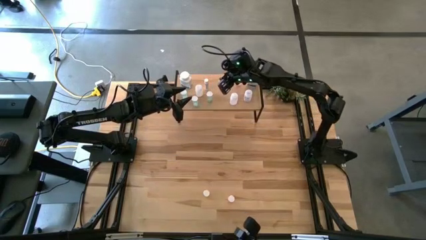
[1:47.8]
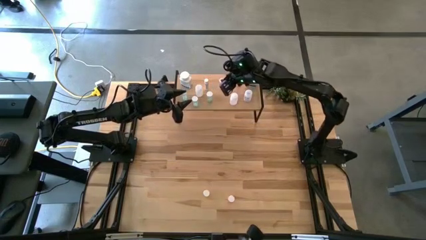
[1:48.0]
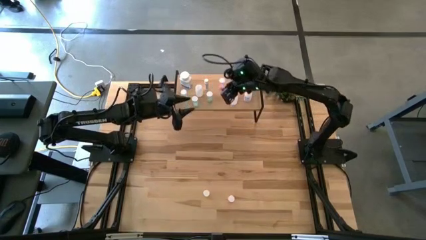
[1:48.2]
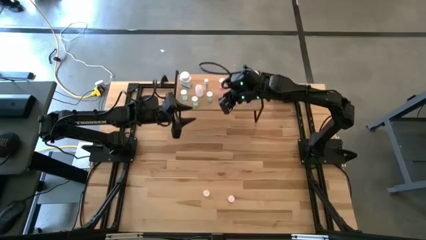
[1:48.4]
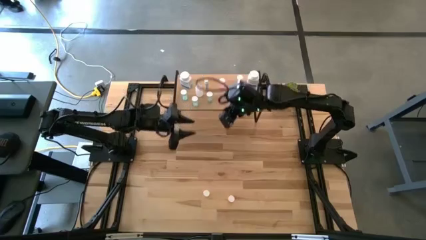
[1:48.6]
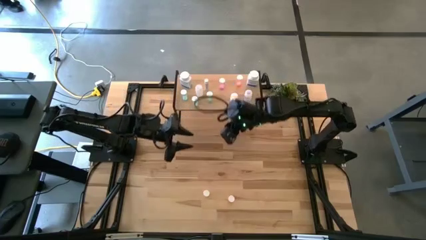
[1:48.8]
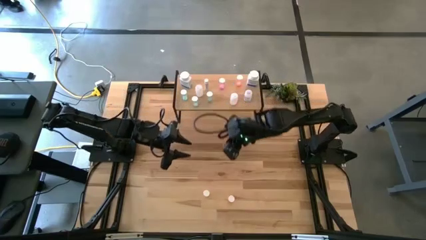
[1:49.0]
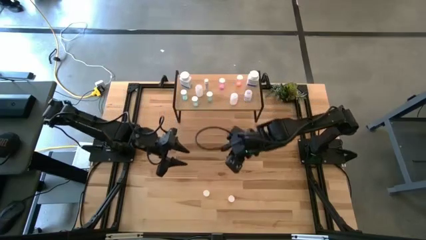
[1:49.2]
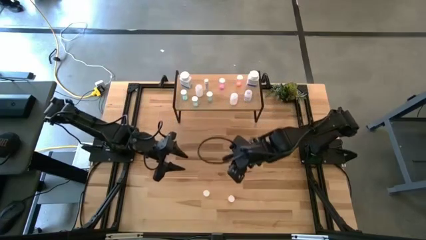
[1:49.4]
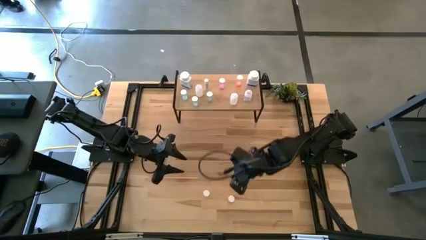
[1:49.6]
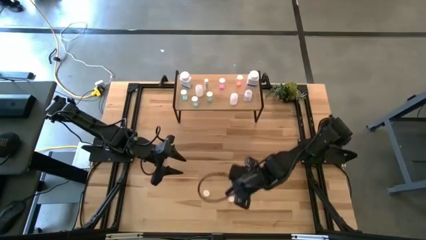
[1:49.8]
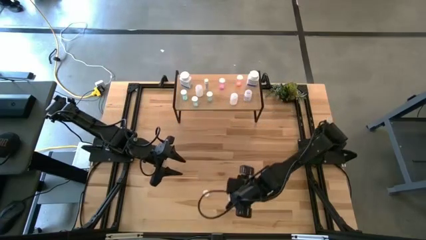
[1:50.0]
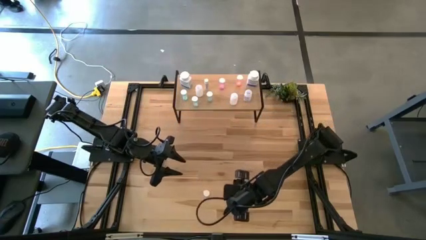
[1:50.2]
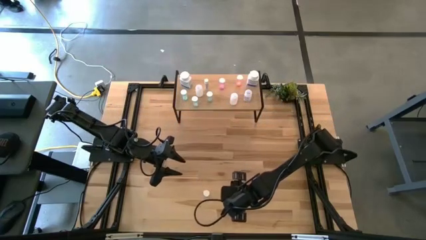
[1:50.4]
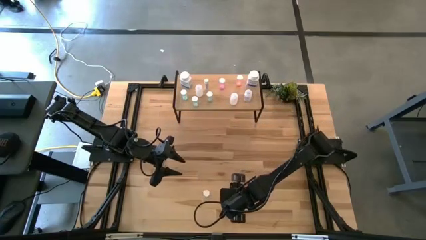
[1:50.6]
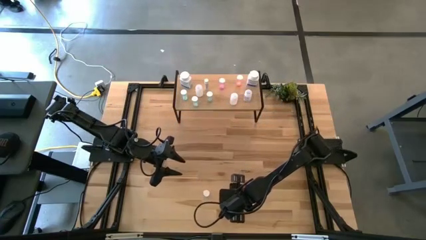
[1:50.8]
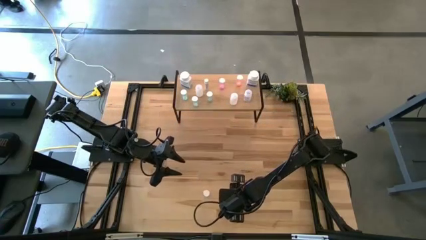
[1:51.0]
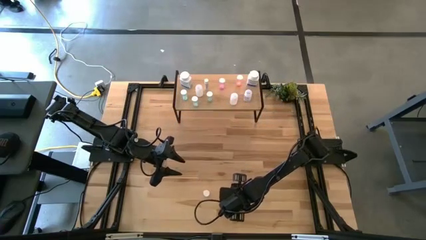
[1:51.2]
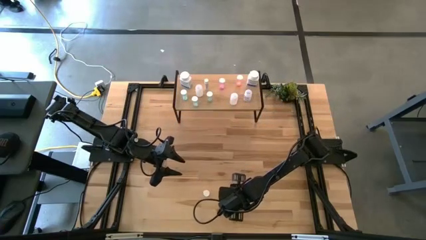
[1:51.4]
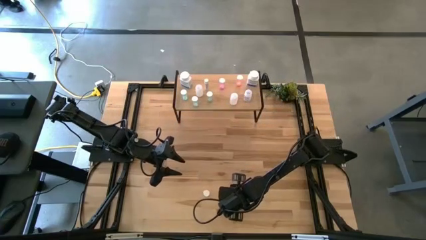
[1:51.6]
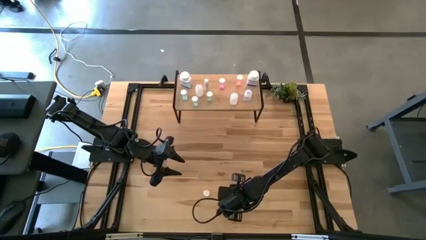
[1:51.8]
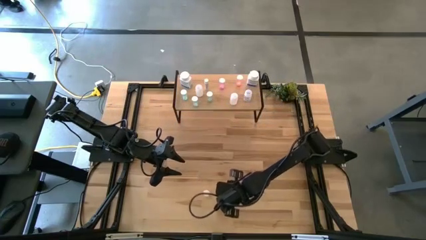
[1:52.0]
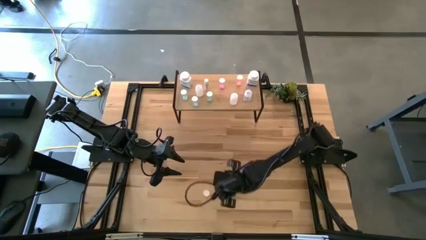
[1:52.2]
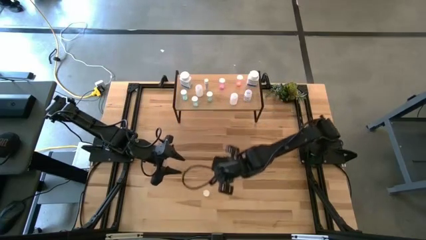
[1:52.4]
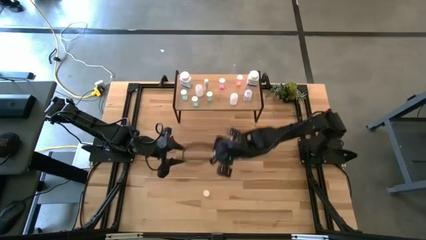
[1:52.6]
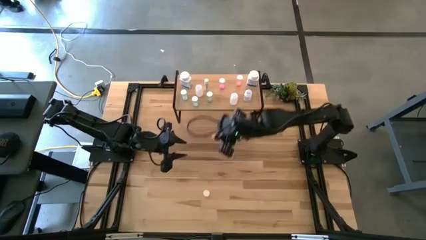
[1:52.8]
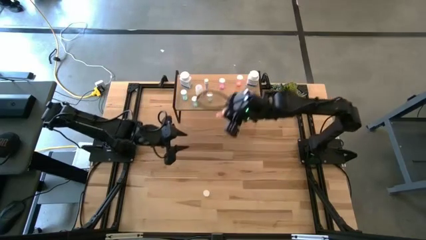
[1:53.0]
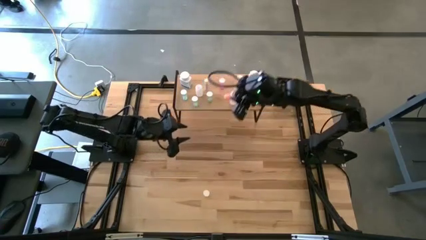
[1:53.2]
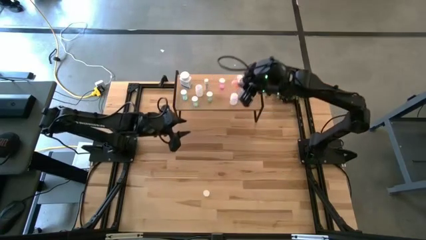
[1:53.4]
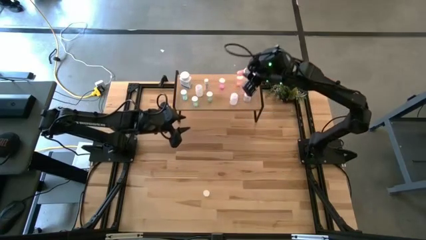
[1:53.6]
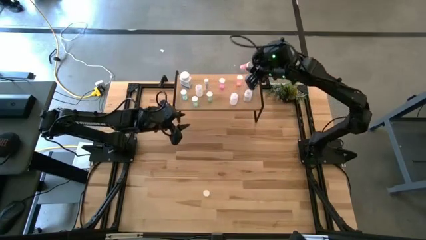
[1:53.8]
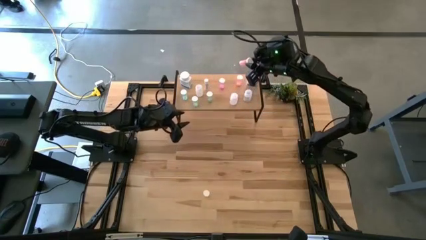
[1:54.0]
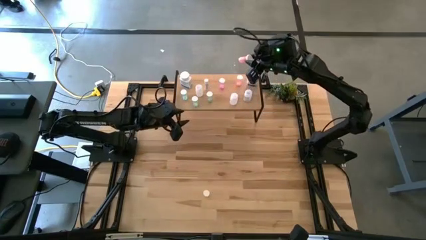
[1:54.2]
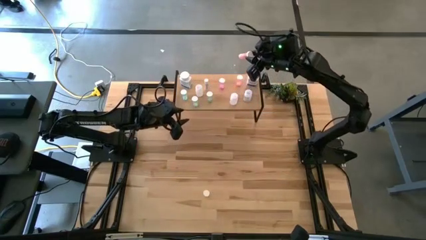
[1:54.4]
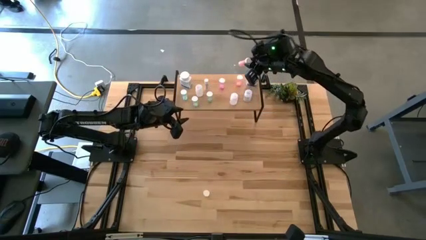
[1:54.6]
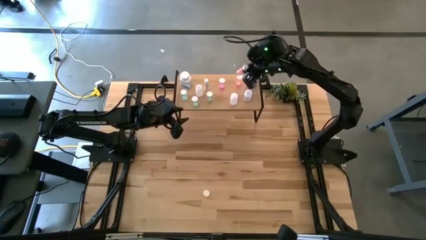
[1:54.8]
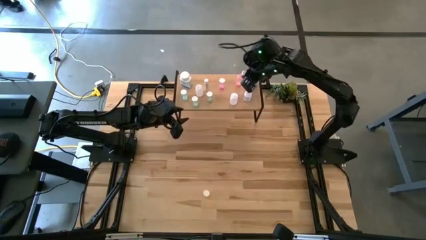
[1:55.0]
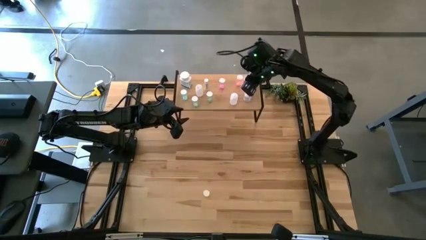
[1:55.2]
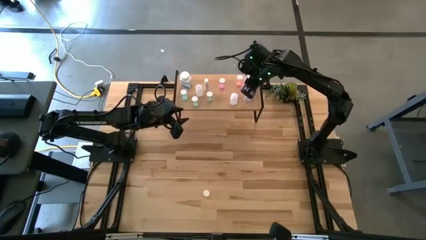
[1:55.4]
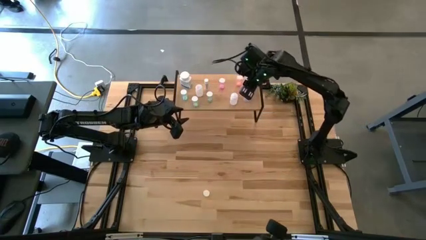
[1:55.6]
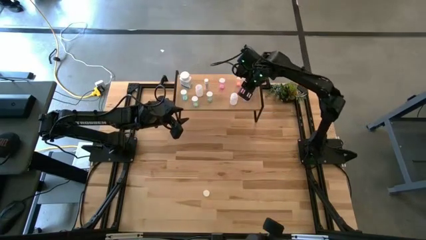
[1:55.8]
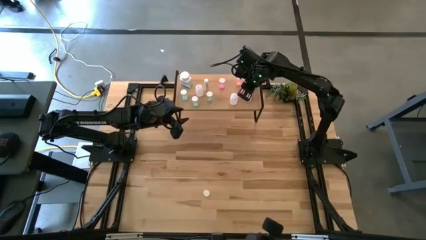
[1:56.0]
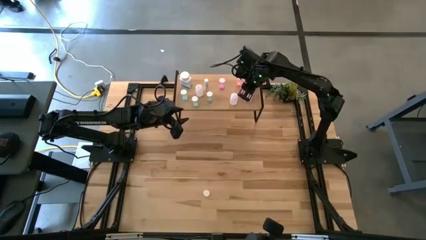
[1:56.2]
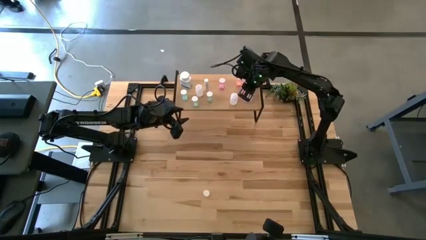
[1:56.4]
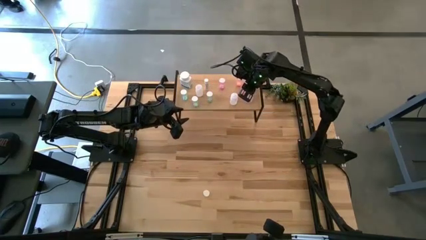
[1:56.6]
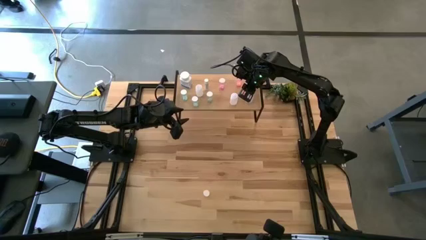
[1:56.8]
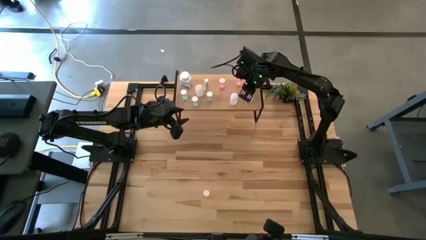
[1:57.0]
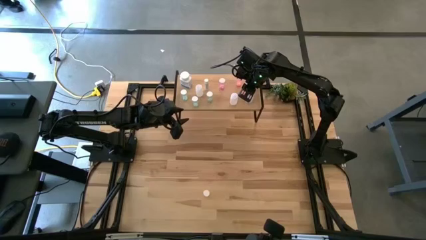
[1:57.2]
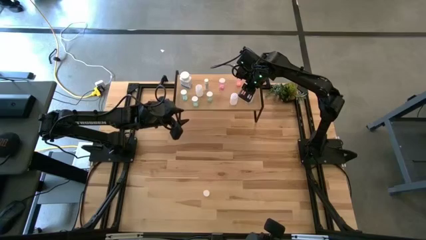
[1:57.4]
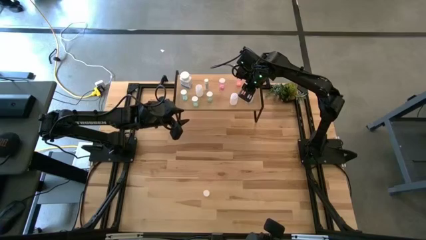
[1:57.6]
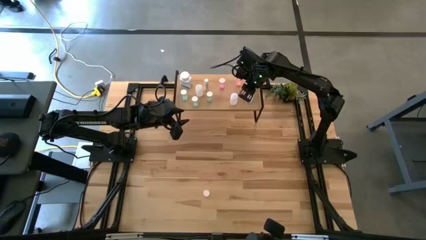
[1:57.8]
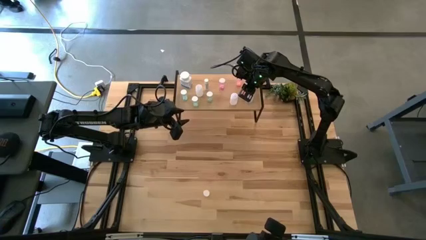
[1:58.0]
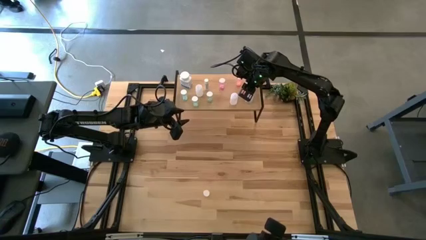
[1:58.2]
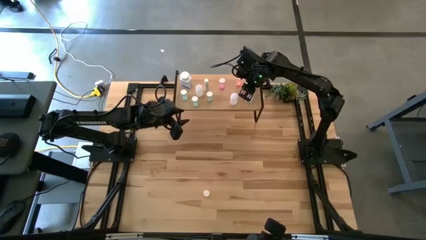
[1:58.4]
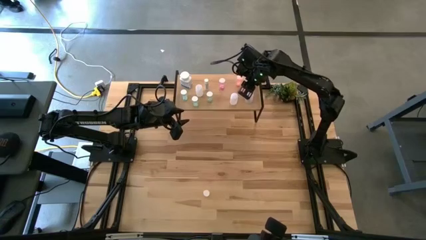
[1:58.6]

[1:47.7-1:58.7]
Task: Pick and place medicine bottles onto shelf by color
Put the red medicine bottle on the shelf
